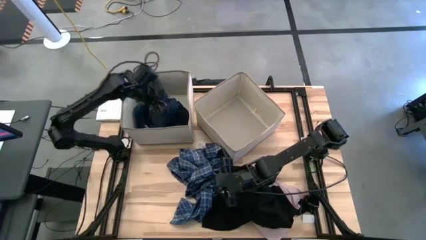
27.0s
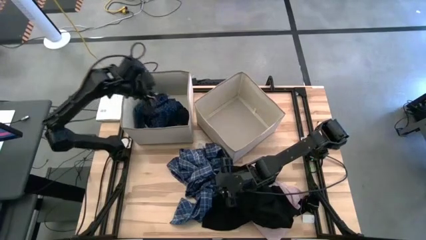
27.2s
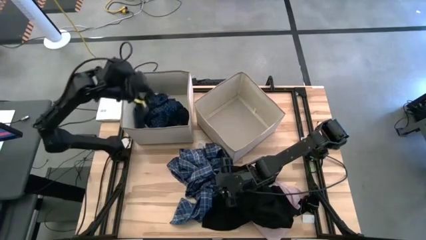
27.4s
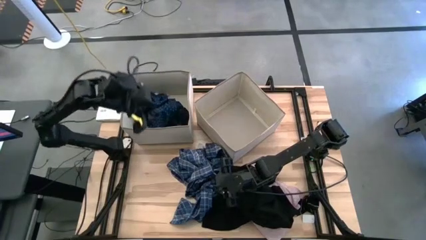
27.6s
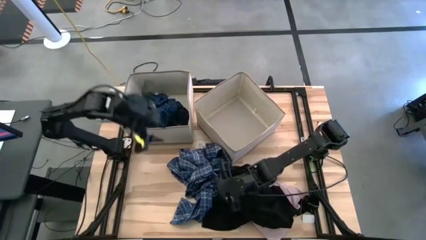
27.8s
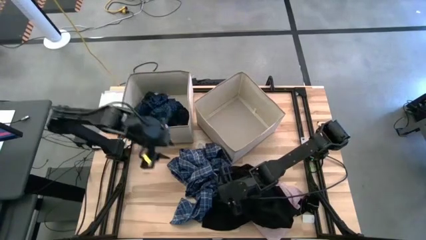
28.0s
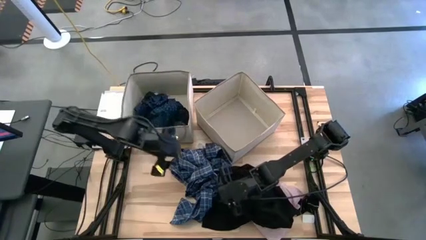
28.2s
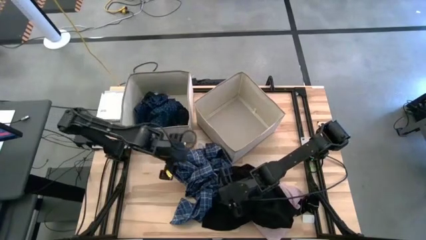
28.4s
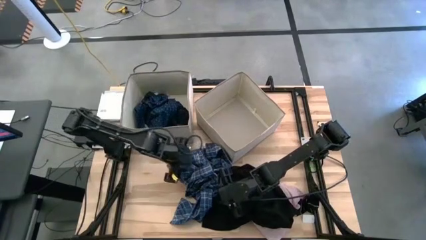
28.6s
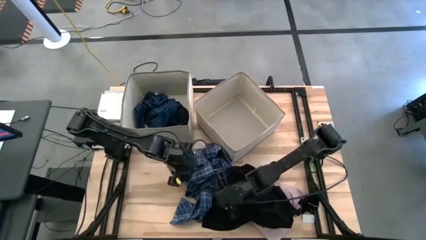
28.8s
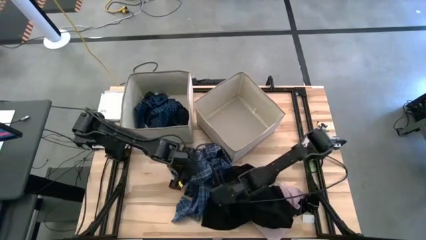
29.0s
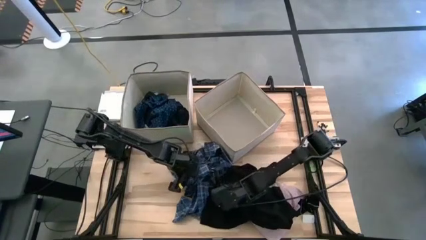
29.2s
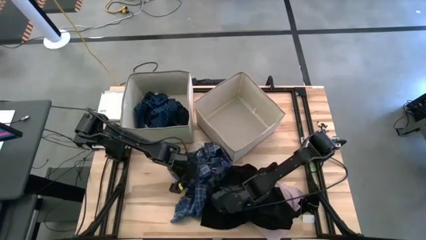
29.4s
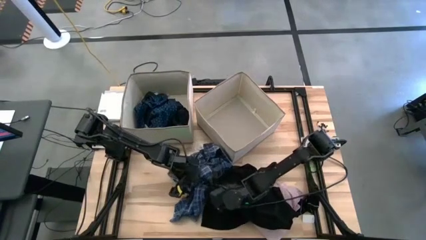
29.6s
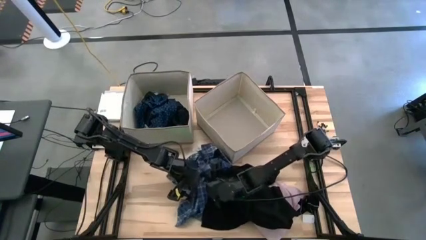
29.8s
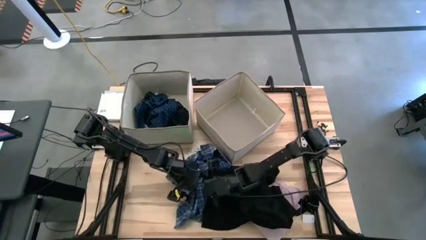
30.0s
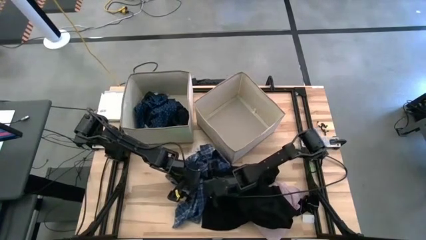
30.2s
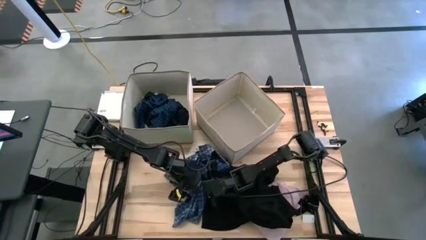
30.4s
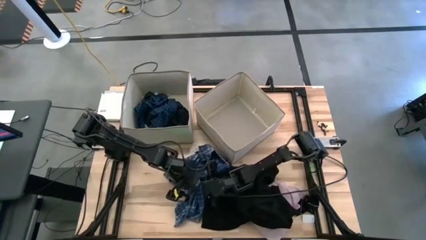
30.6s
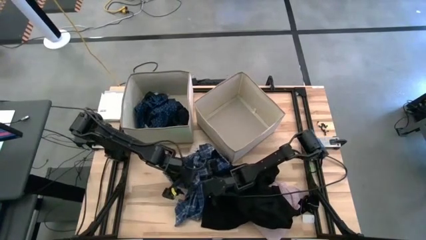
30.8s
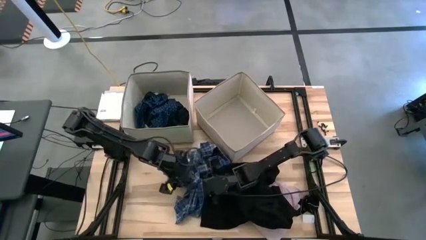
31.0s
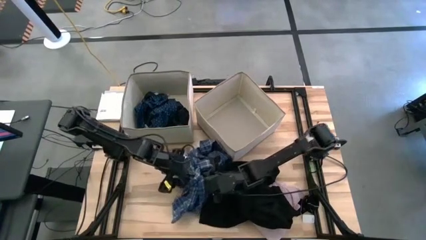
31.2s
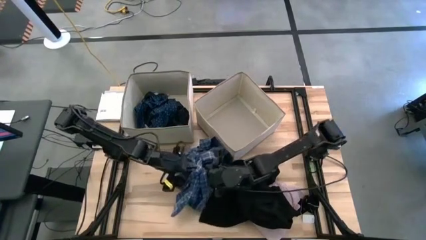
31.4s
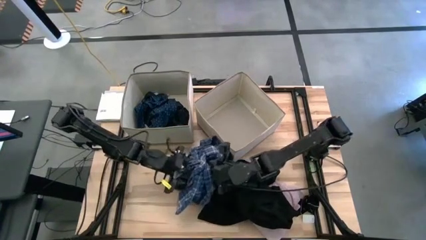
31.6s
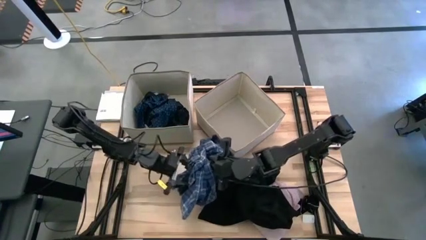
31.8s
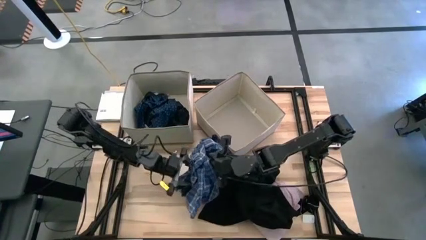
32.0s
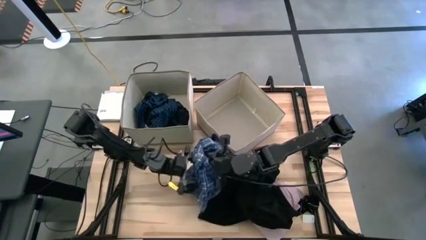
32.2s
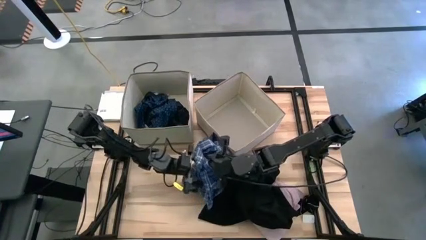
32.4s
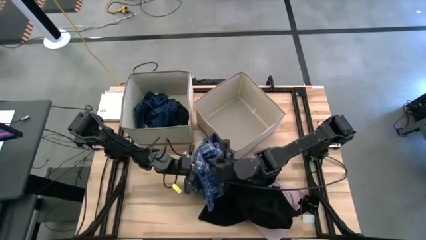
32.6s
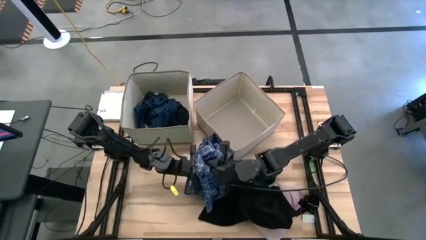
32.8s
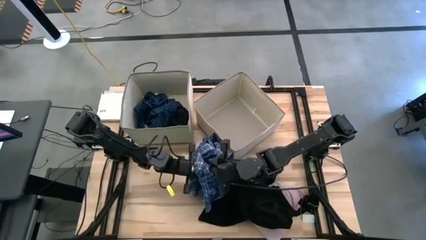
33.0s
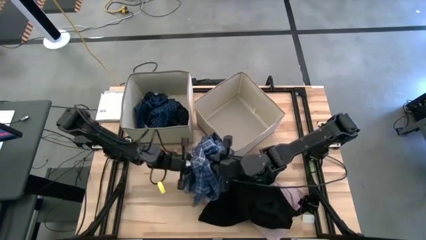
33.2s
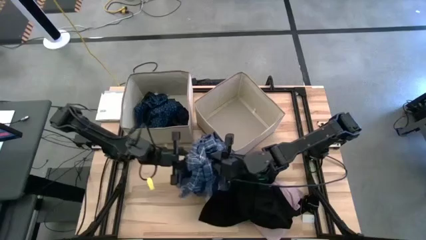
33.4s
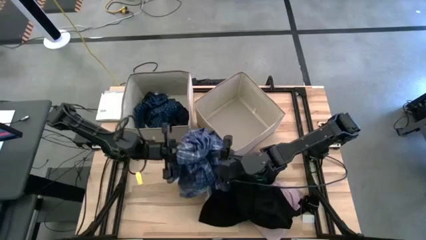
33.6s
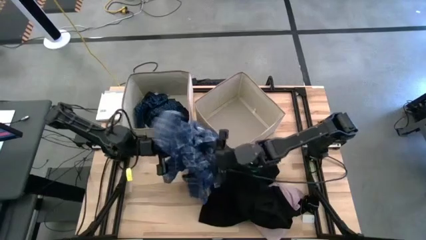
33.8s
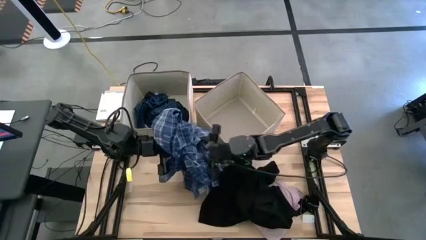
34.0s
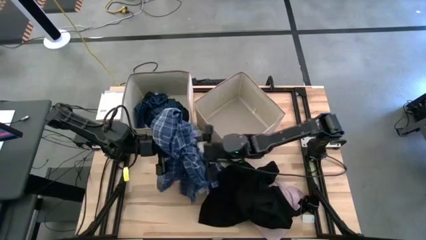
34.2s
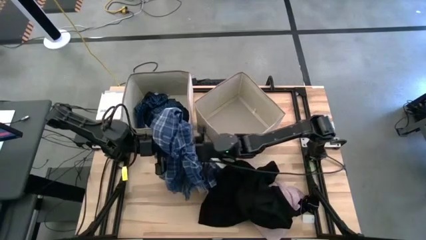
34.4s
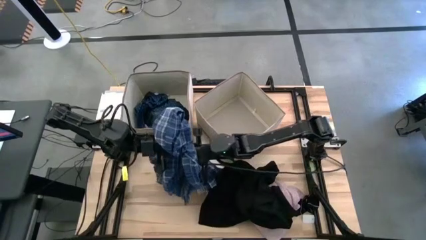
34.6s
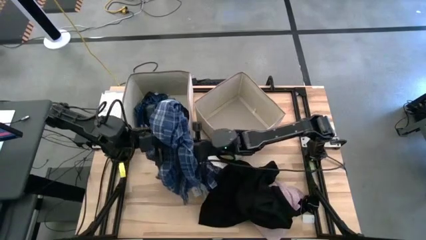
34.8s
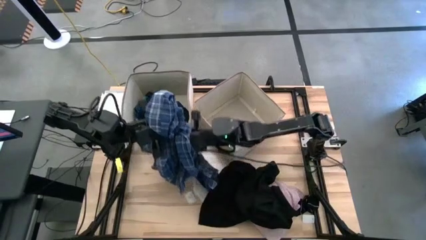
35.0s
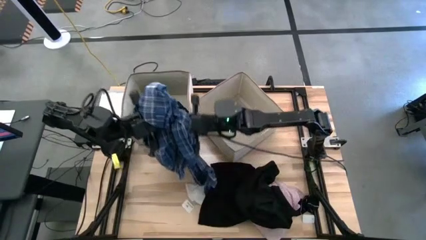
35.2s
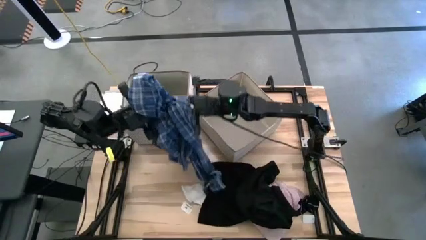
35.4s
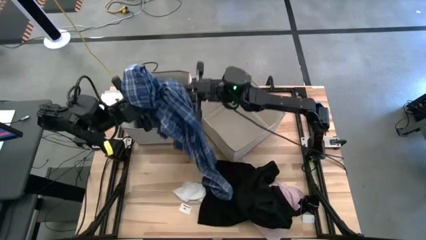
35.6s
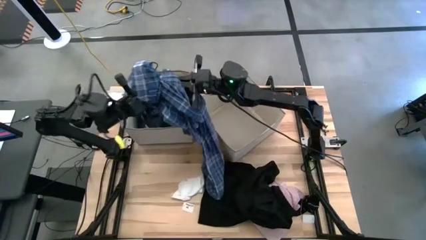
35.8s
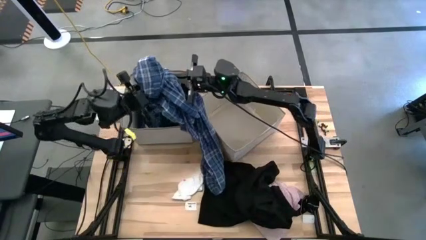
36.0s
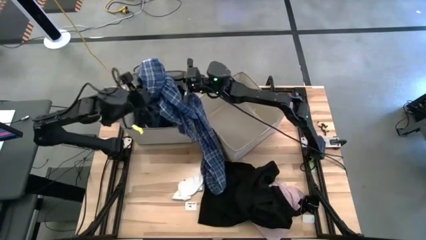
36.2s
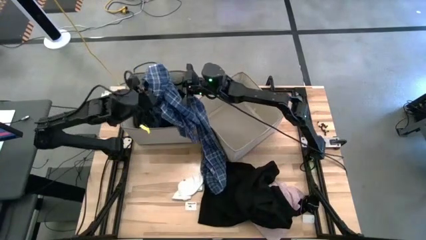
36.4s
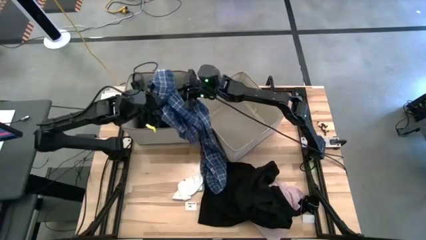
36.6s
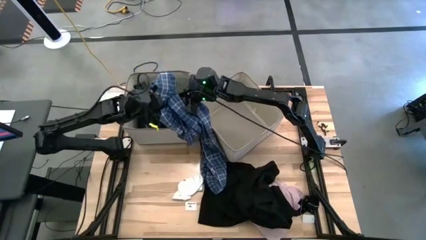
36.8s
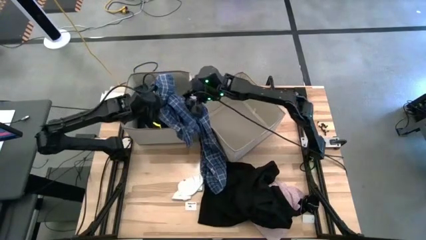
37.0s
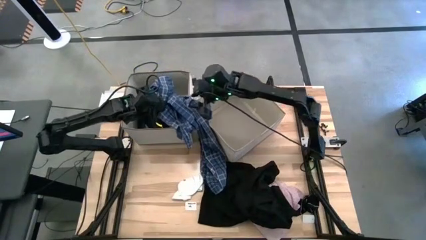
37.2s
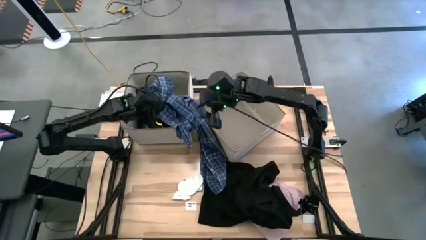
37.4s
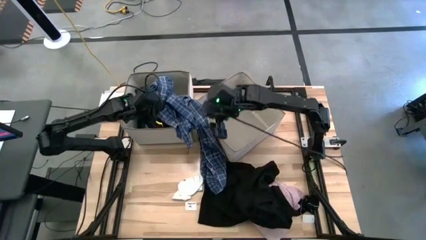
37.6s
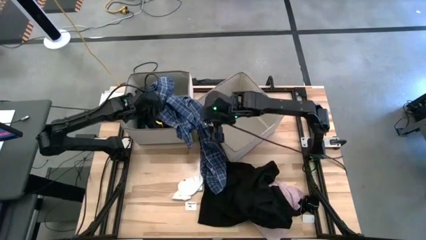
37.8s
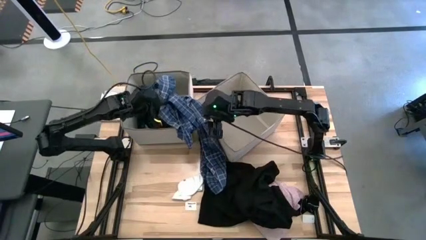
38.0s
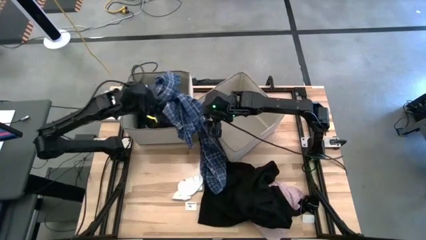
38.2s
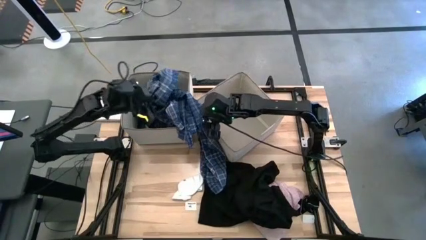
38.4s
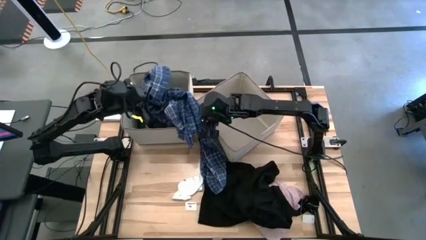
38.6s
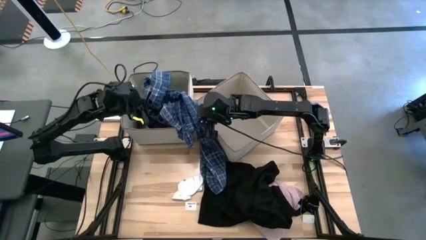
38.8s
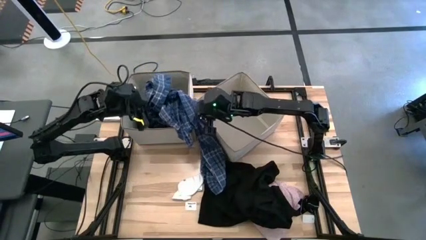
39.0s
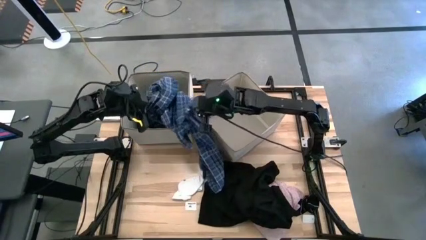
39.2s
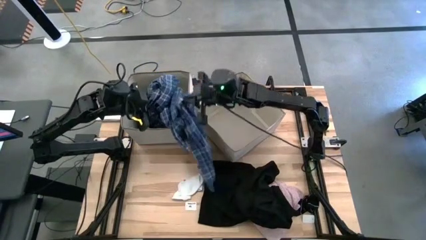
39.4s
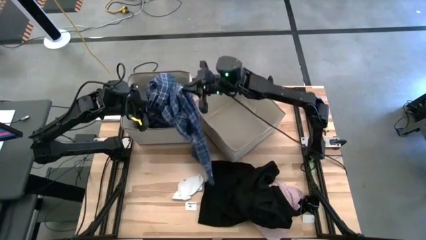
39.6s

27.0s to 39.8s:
Task: Sort clothes
Put the blue checkered pants into the left laundry organizer

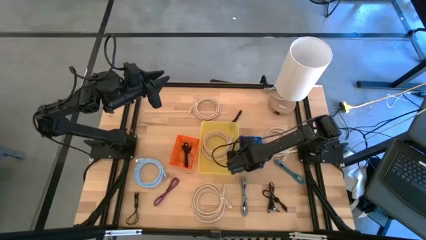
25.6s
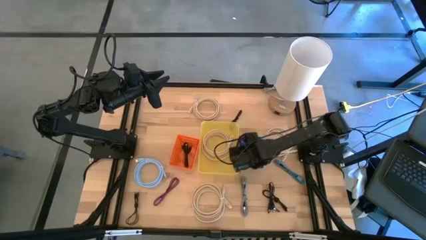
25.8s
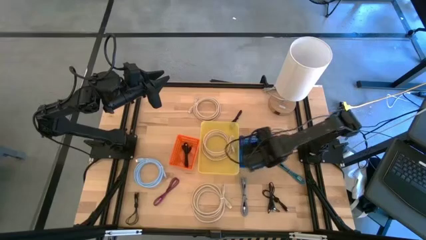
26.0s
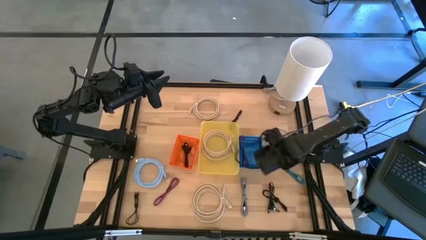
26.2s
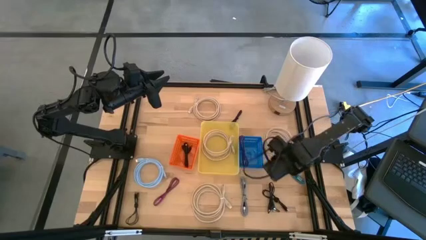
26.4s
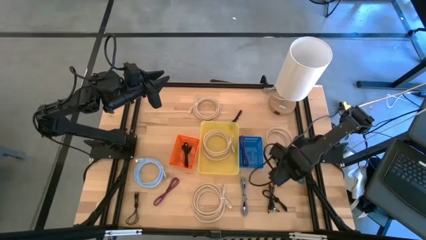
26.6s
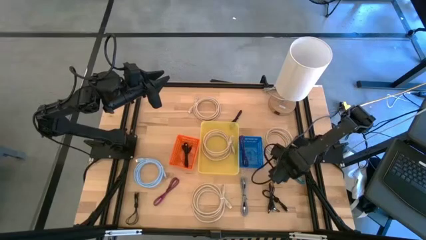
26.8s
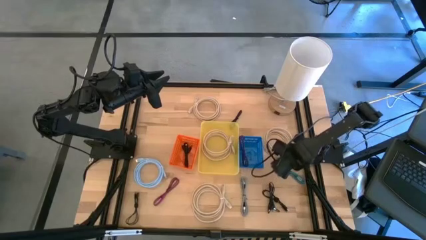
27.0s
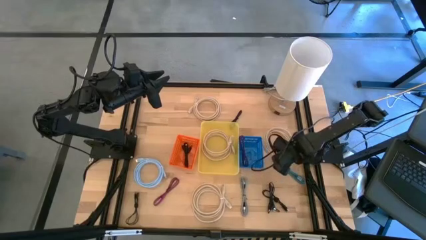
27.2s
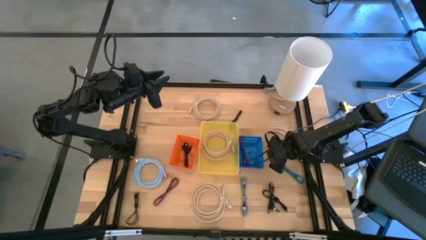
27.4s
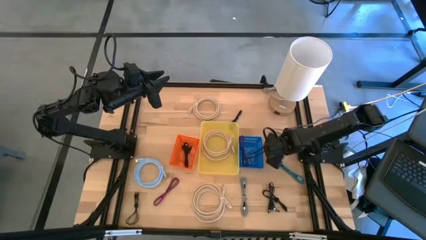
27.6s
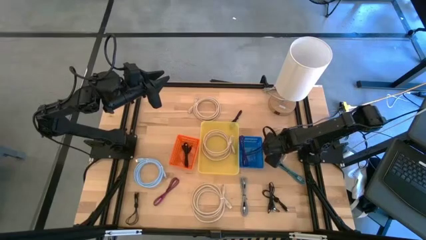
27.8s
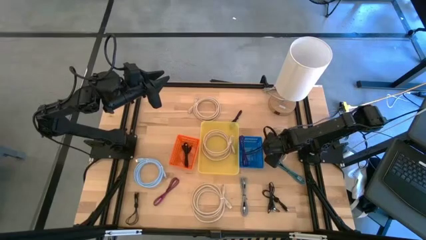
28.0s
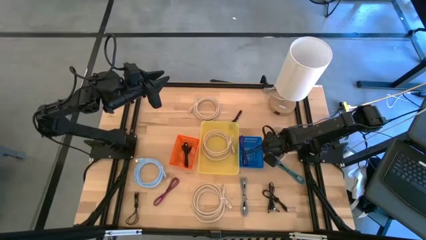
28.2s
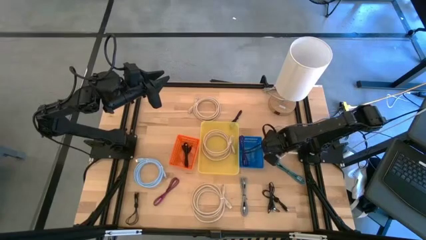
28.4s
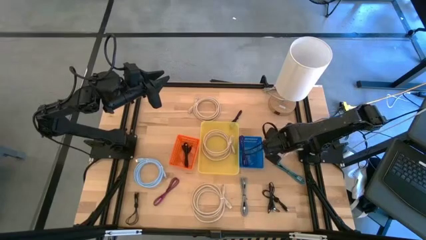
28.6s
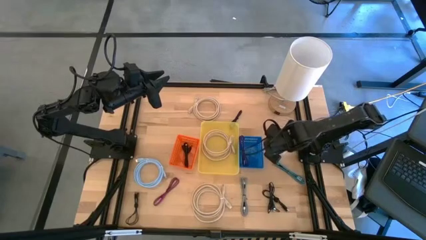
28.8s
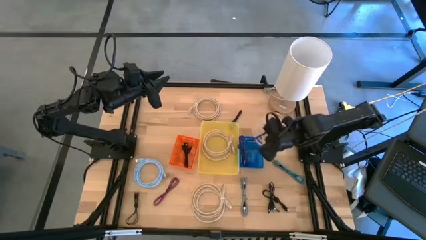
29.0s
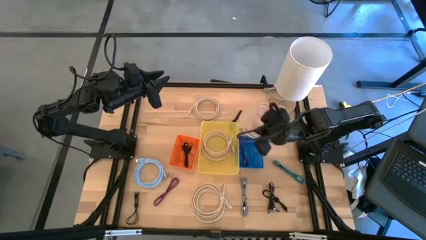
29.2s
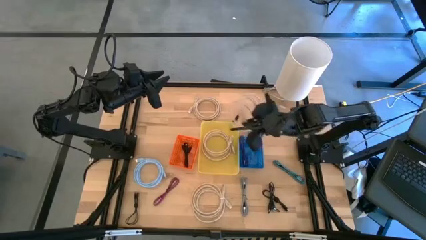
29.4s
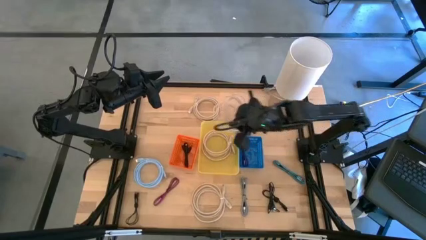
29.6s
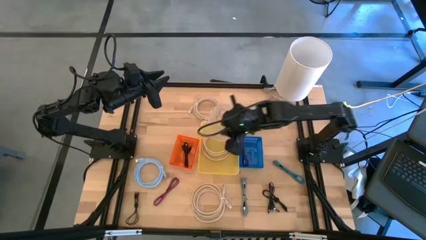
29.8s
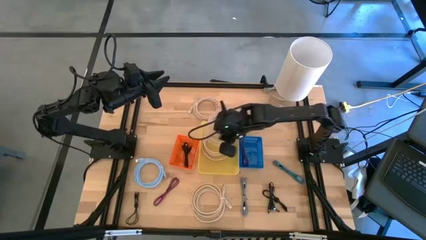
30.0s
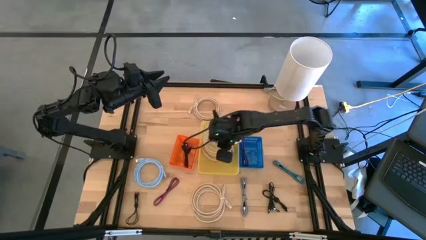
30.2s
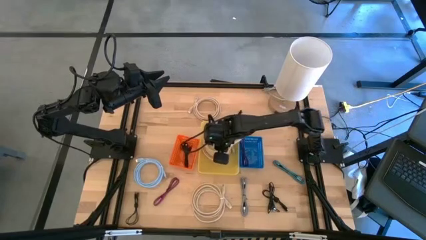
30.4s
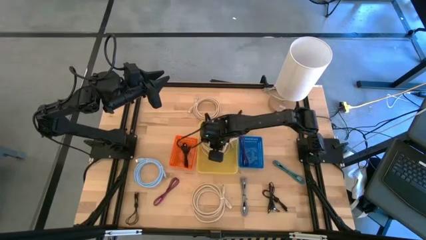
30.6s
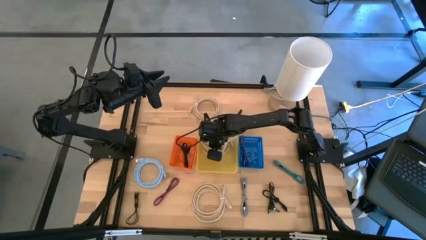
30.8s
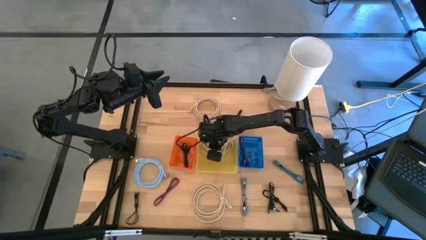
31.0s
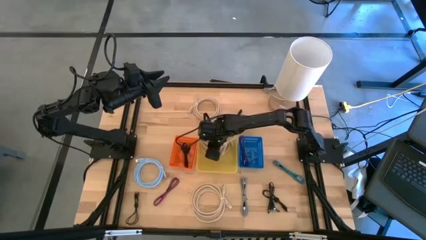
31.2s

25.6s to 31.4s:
Task: Pick & Place USB Port
Put the white usb cable into the yellow bin
